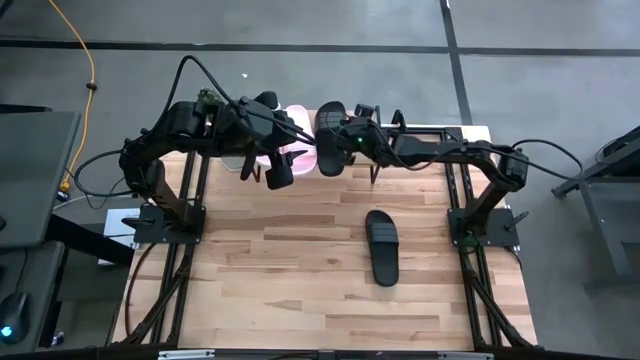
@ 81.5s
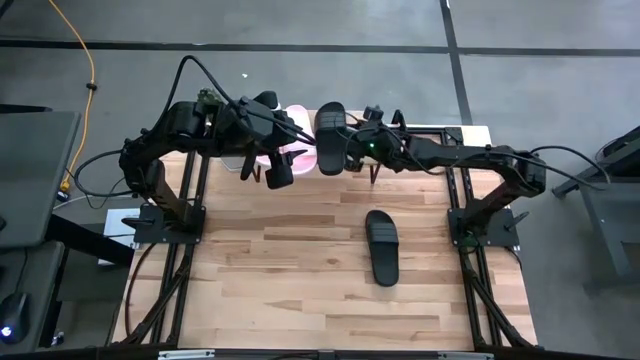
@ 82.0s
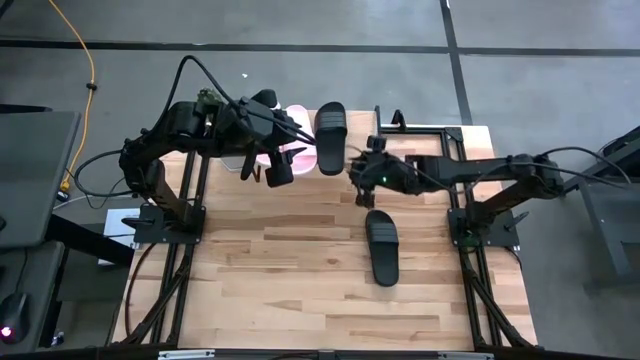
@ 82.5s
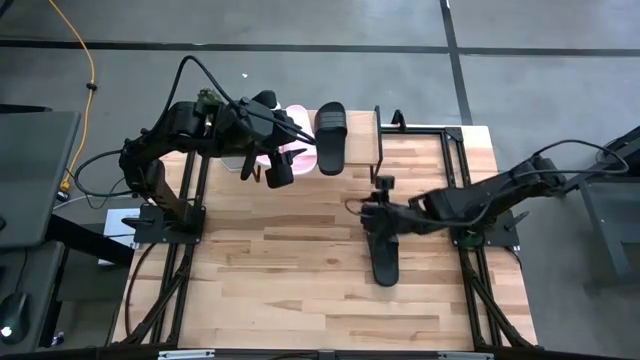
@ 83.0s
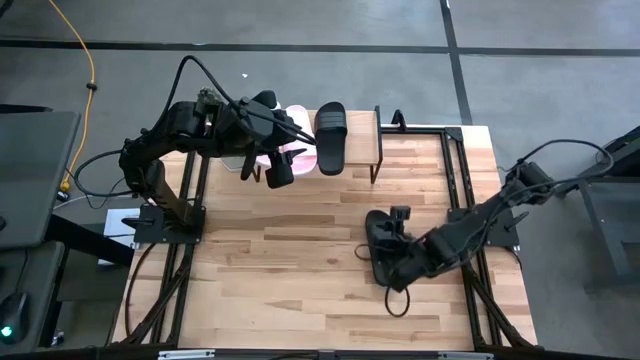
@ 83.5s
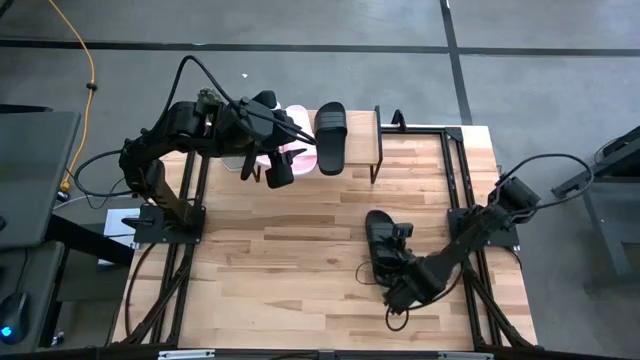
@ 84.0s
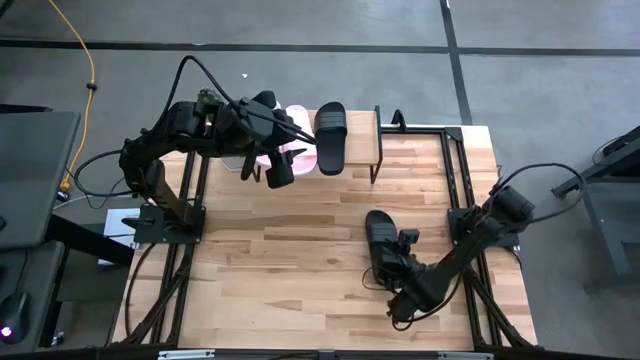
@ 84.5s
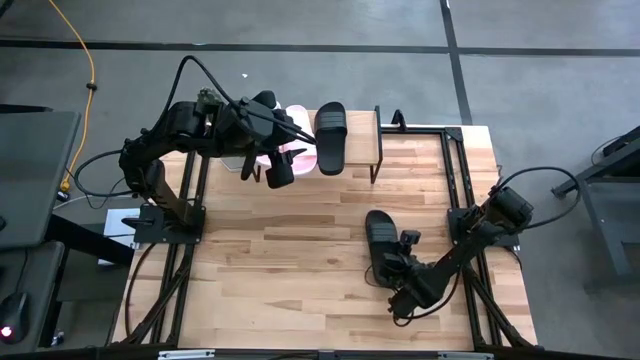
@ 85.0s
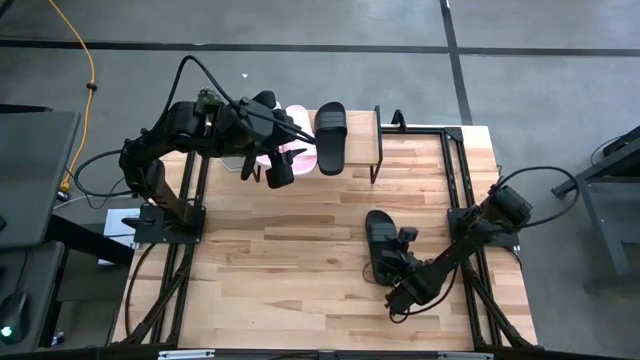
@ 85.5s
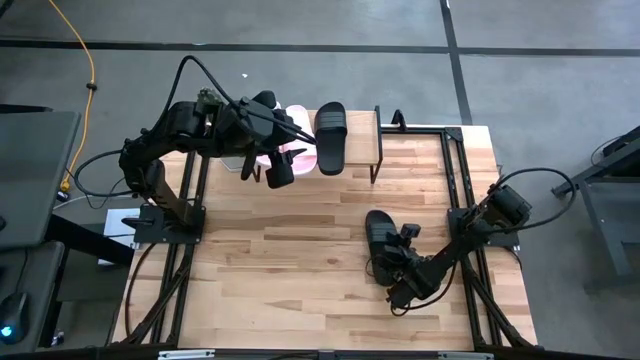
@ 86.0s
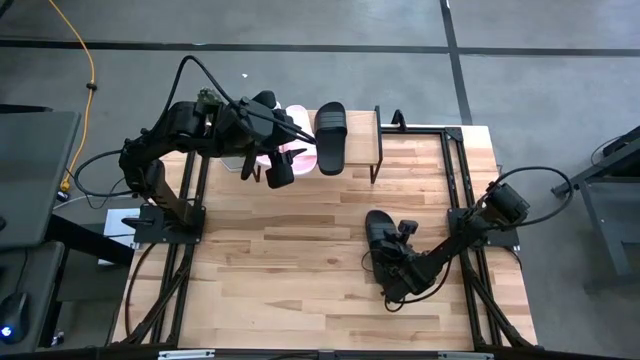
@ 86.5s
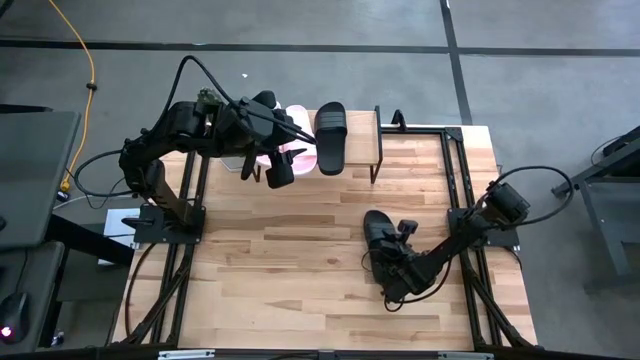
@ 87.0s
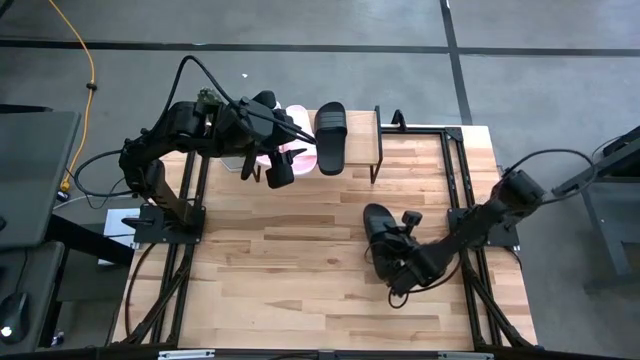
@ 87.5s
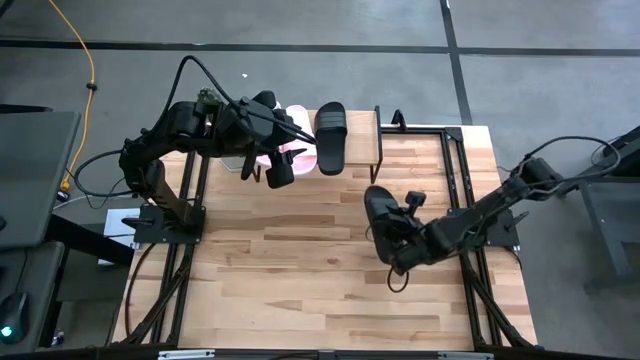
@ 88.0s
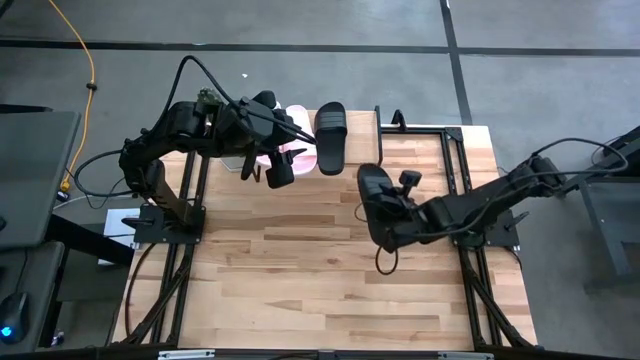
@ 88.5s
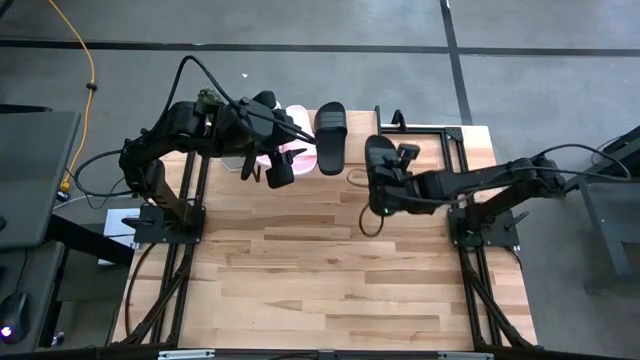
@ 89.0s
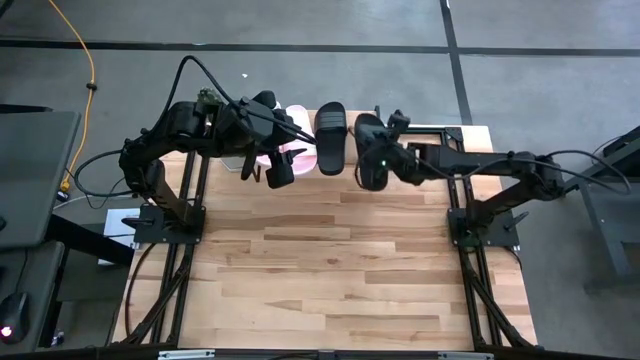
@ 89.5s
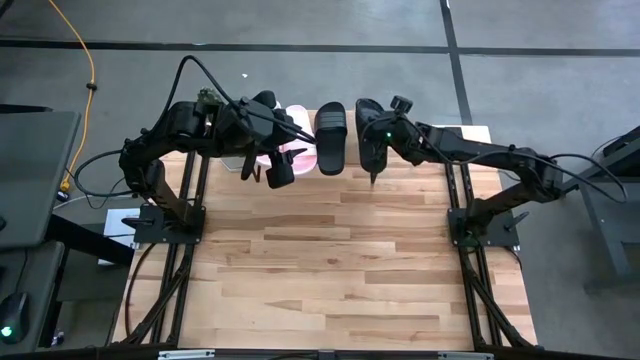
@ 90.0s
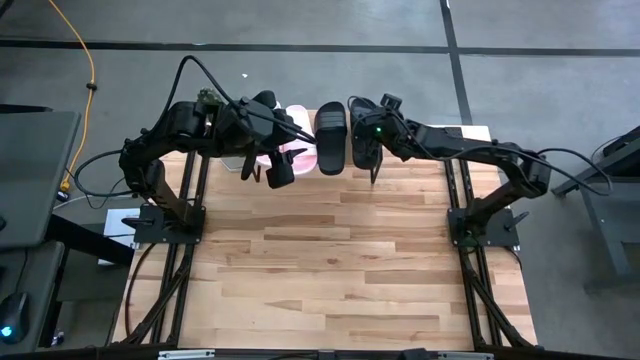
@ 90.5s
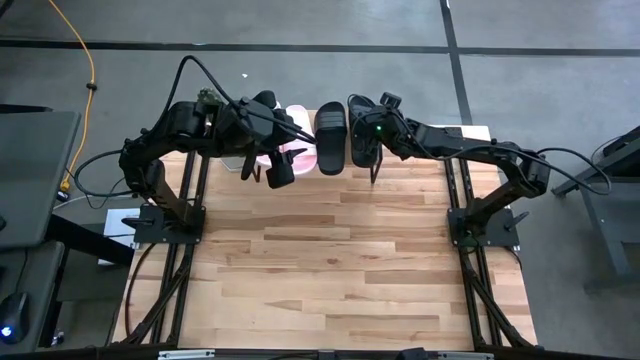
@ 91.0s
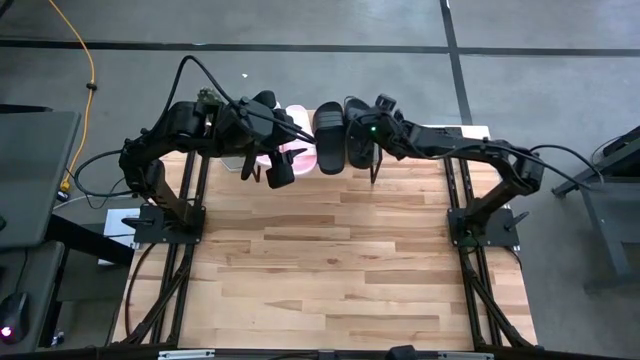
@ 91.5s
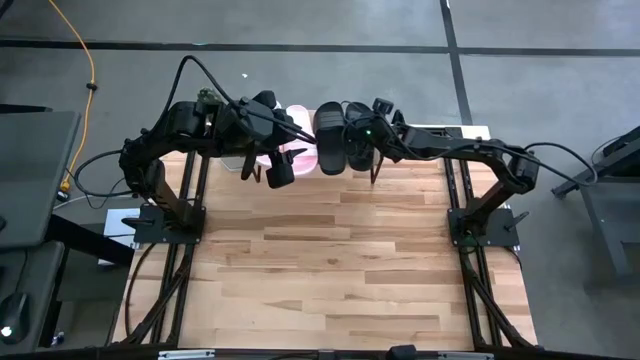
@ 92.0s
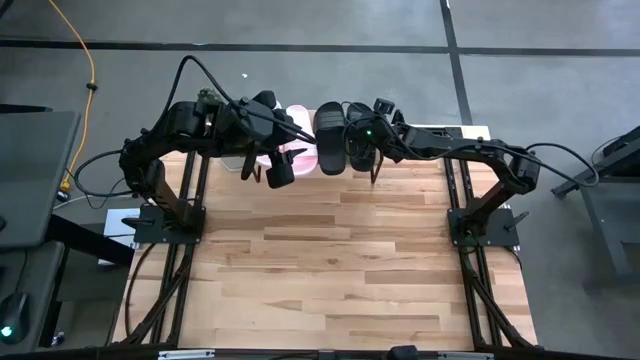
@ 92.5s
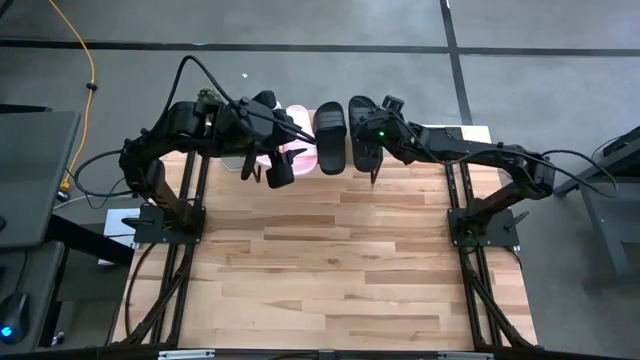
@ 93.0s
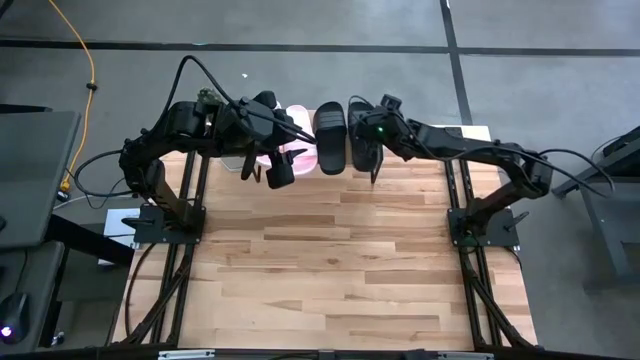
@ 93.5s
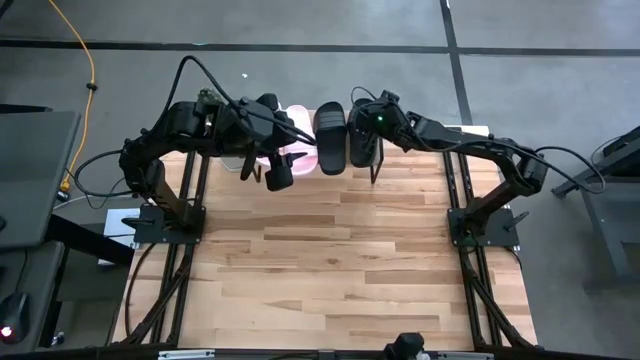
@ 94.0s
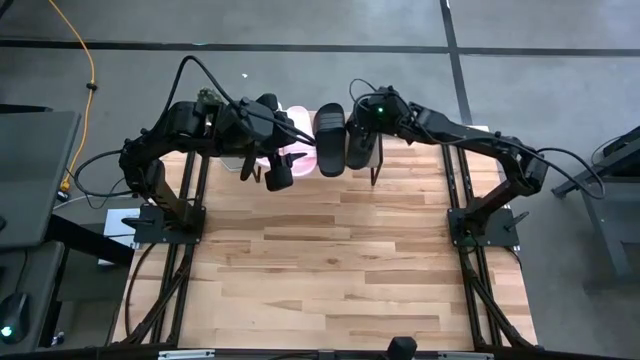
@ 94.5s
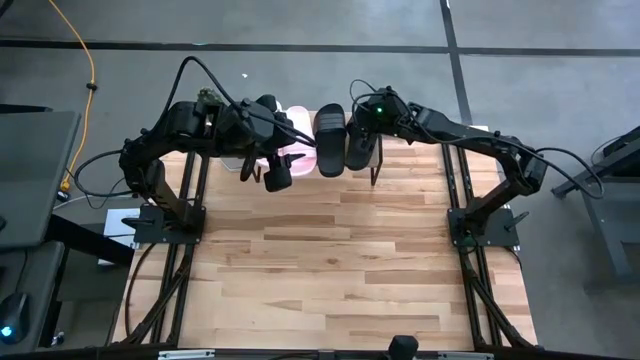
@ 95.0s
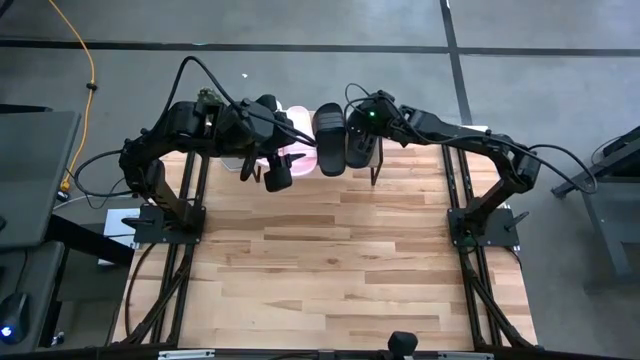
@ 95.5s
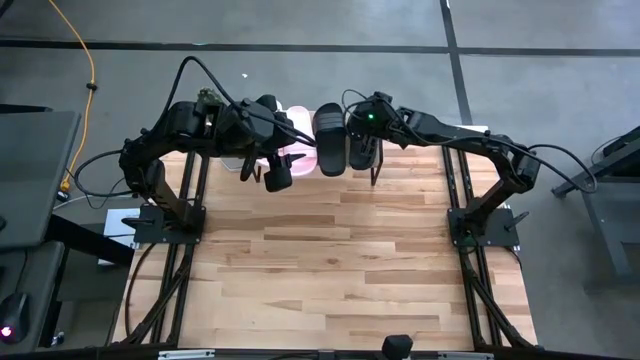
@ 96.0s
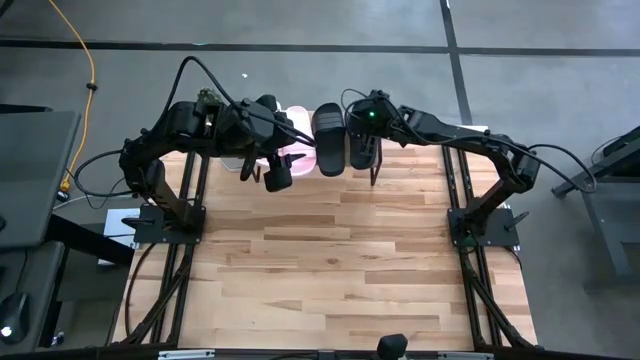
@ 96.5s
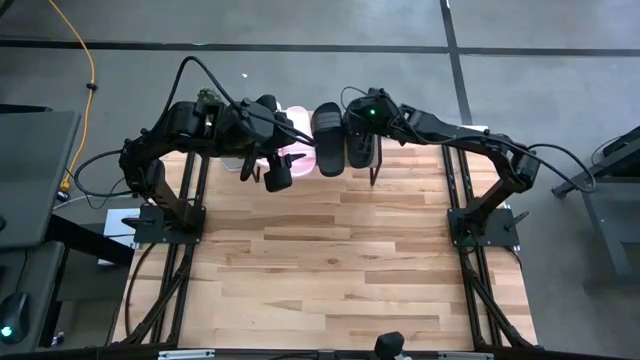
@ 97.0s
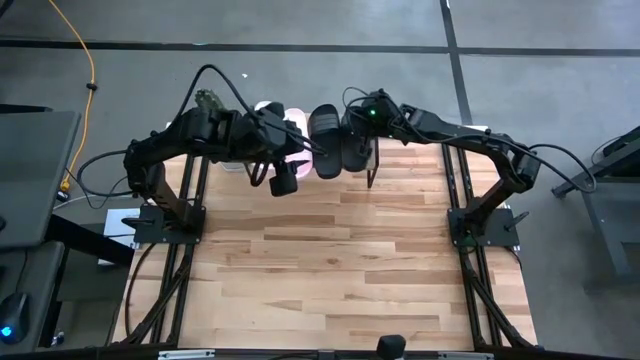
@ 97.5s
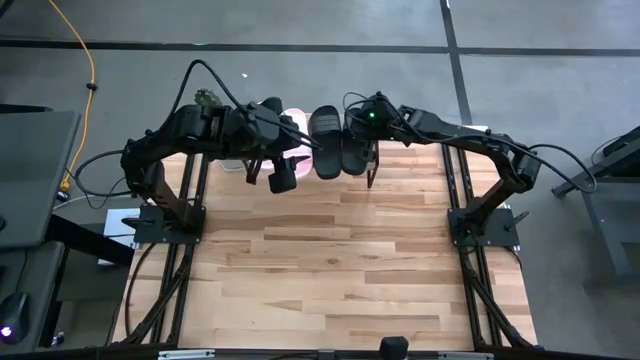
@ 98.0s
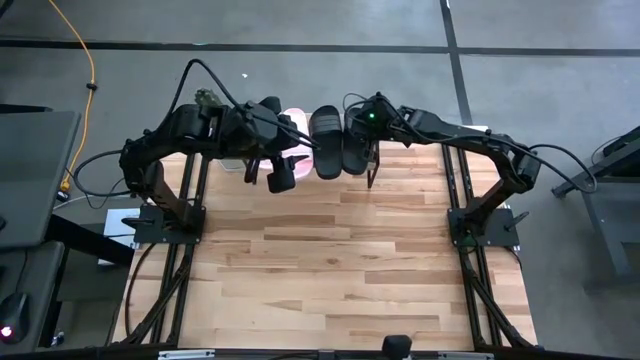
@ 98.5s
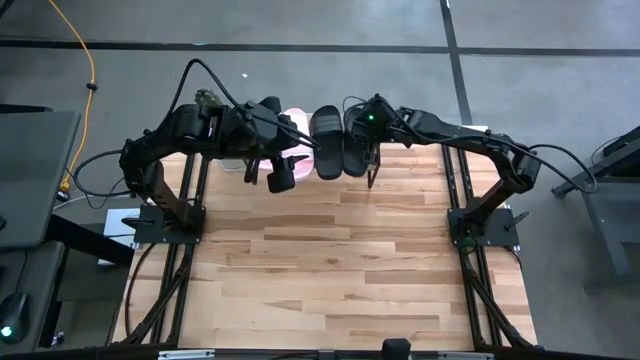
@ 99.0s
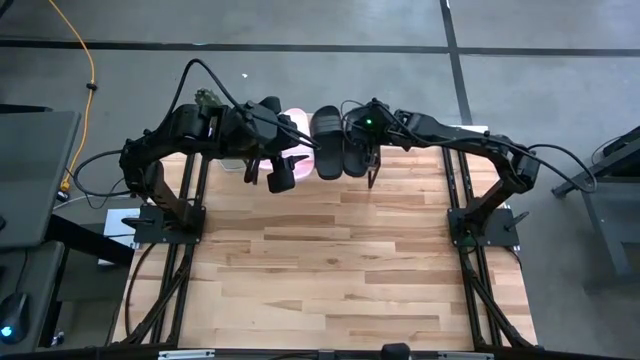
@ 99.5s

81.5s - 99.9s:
Task: Pick and place slides into the shelf
Put the black slipper on the shelf

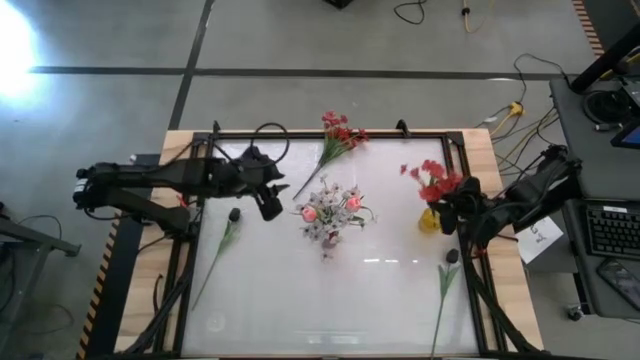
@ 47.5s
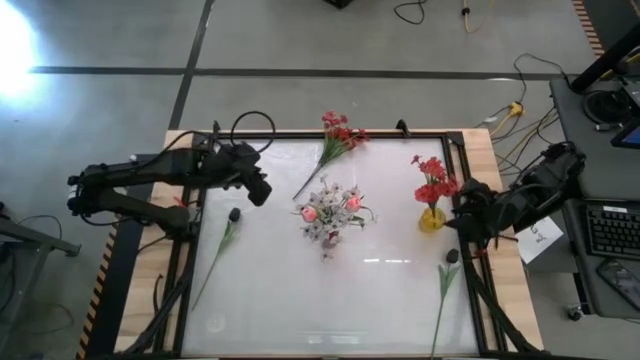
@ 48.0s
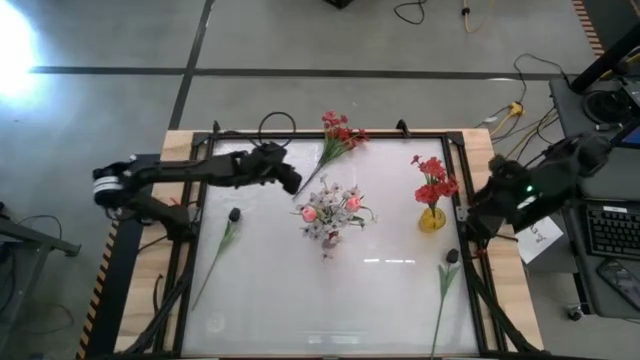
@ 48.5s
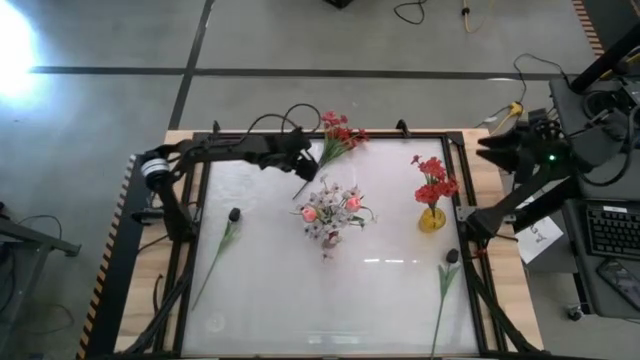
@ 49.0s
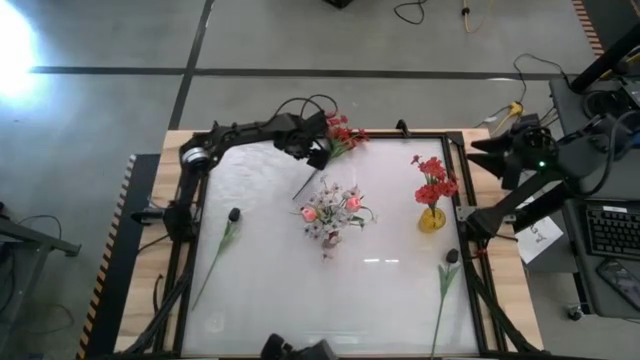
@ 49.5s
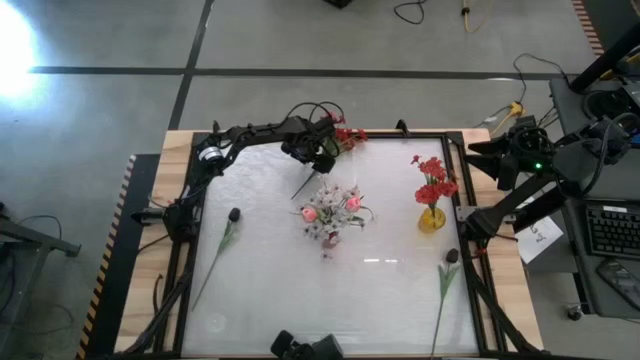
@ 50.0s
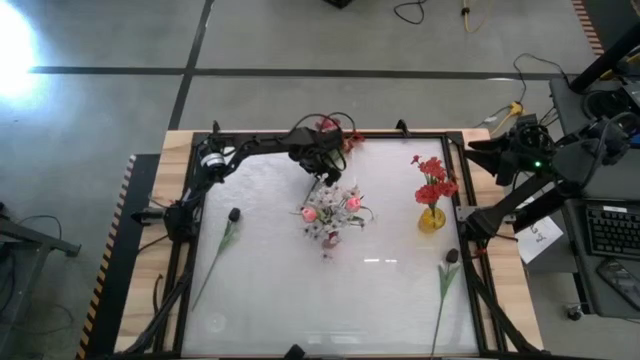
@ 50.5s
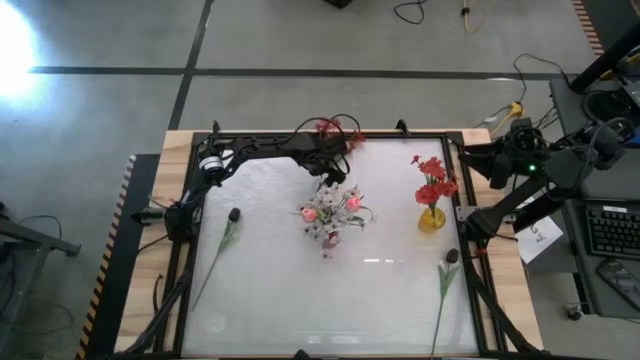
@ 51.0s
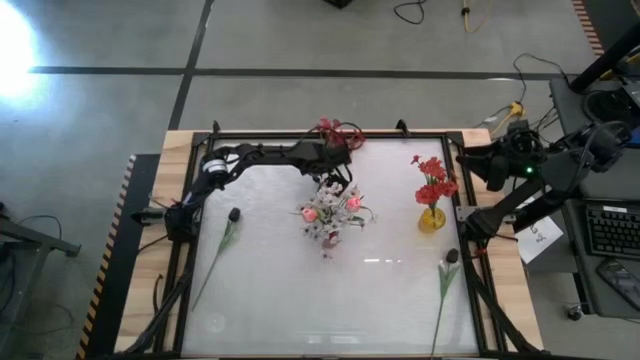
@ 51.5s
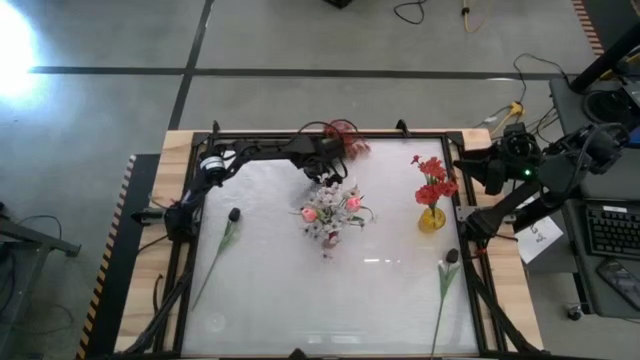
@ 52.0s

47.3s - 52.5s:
Task: Sort flowers into vase by color
Put the red flowers into the yellow vase
